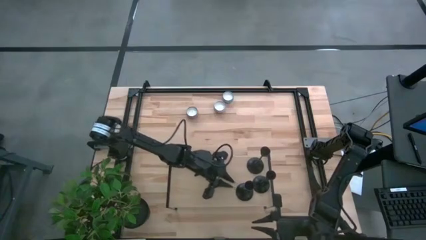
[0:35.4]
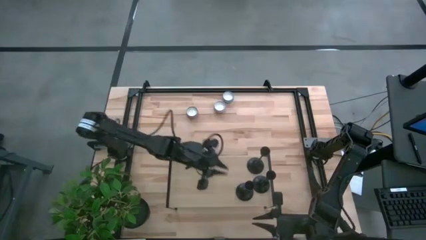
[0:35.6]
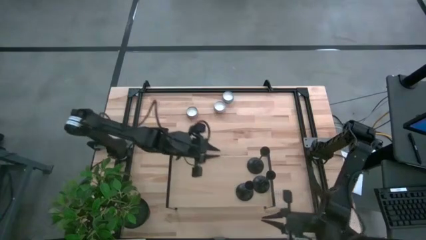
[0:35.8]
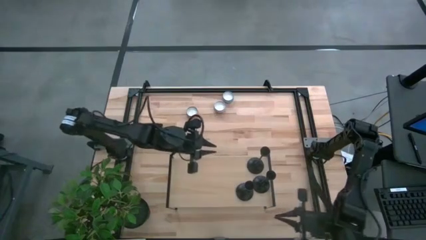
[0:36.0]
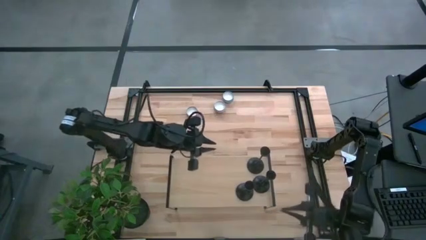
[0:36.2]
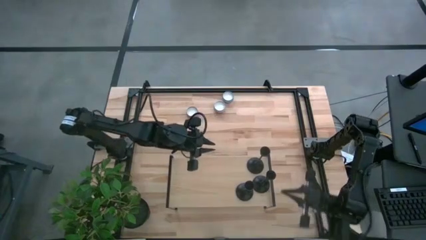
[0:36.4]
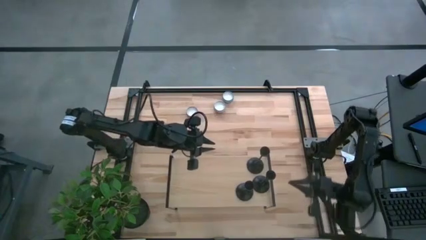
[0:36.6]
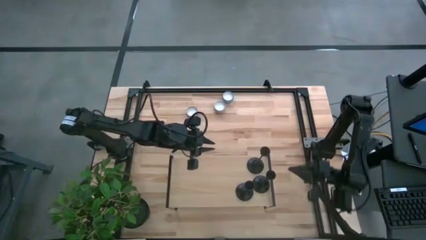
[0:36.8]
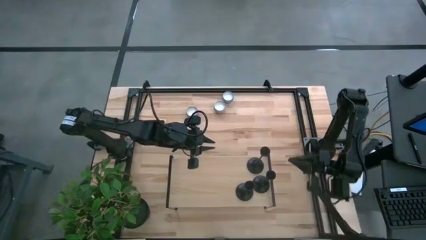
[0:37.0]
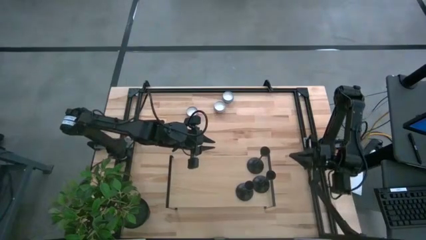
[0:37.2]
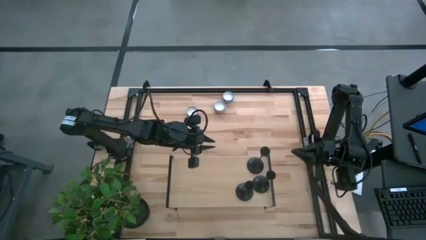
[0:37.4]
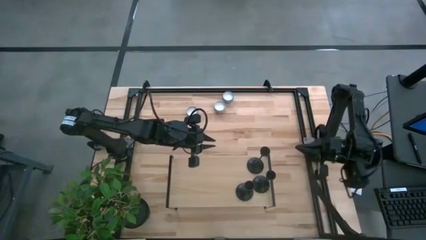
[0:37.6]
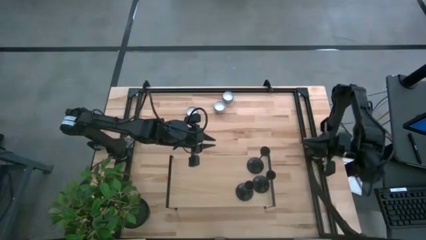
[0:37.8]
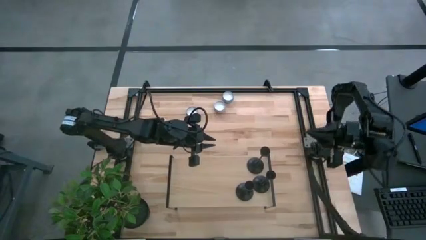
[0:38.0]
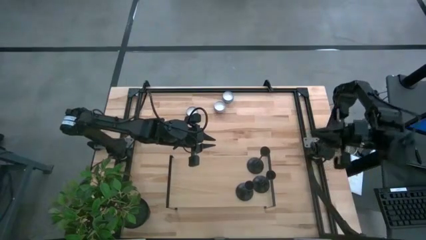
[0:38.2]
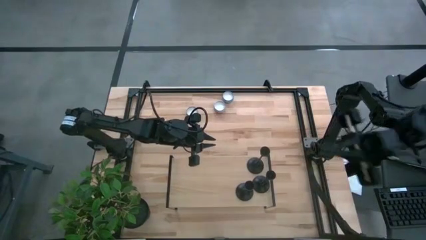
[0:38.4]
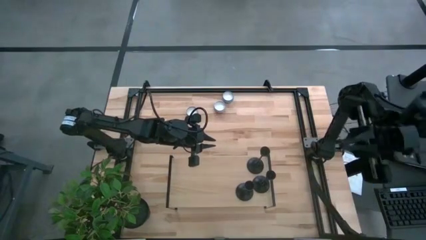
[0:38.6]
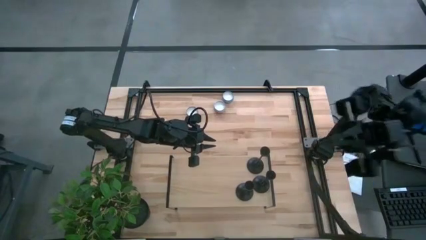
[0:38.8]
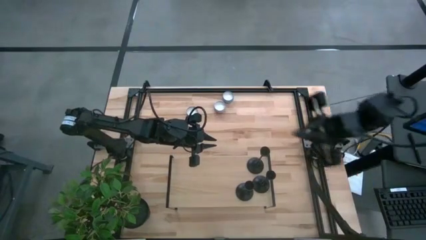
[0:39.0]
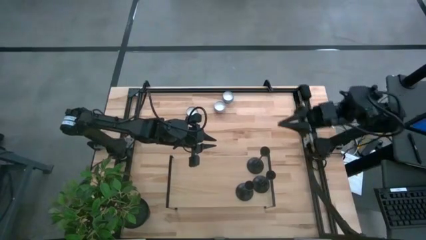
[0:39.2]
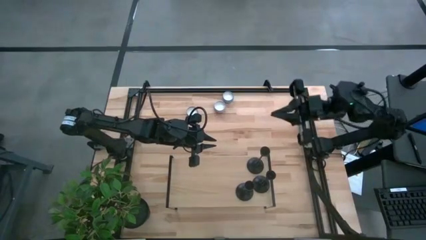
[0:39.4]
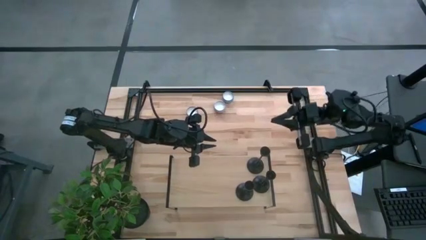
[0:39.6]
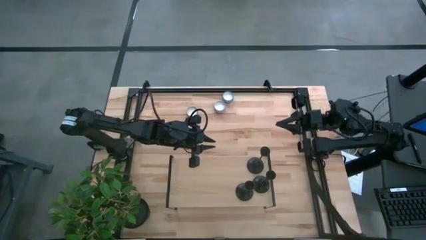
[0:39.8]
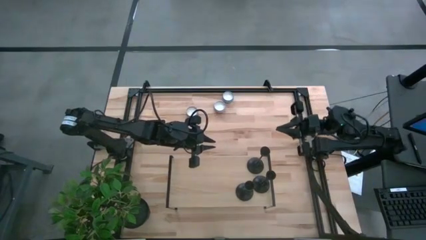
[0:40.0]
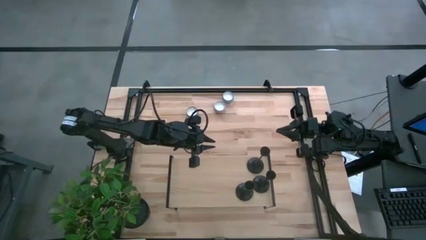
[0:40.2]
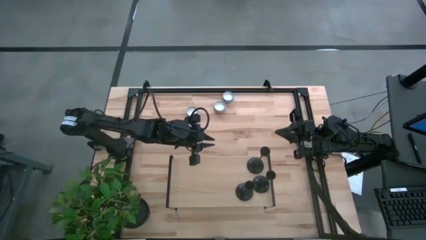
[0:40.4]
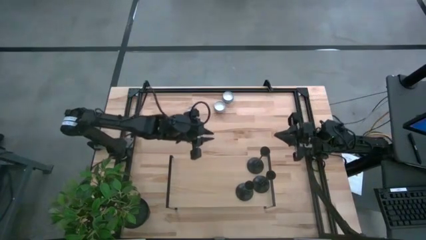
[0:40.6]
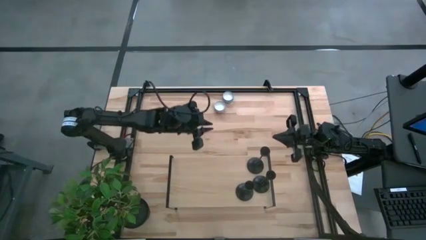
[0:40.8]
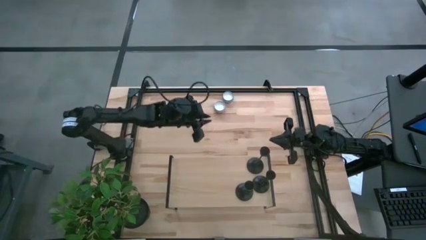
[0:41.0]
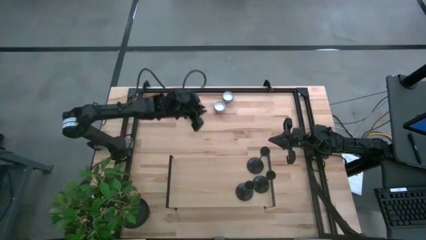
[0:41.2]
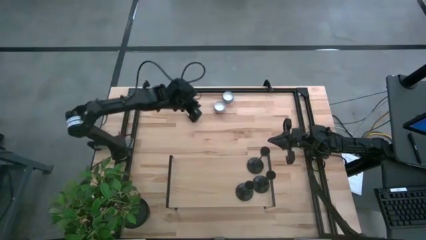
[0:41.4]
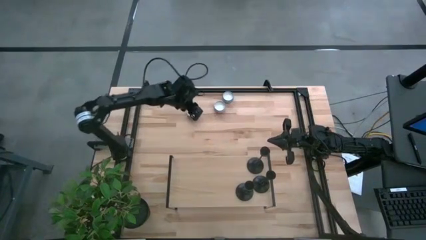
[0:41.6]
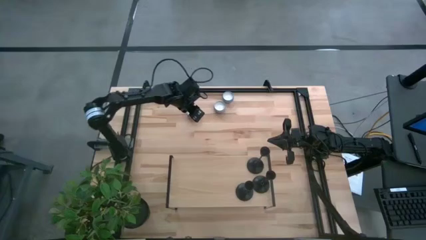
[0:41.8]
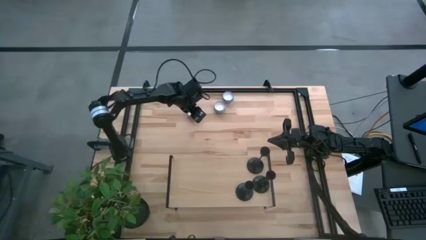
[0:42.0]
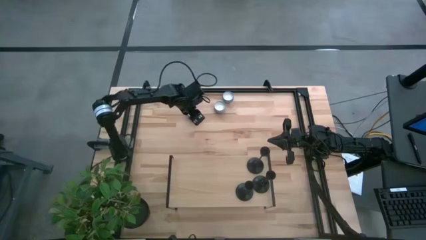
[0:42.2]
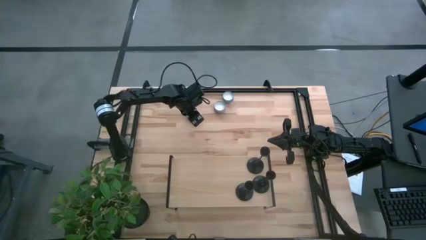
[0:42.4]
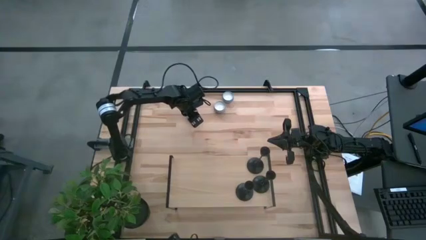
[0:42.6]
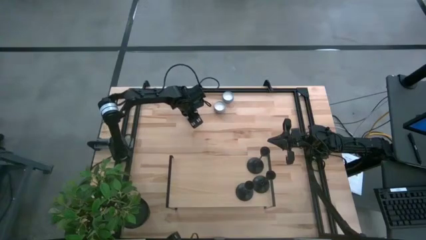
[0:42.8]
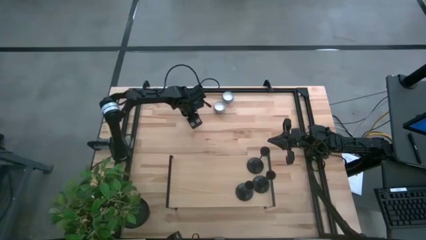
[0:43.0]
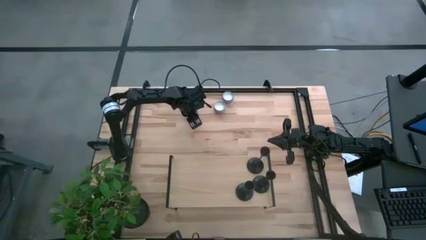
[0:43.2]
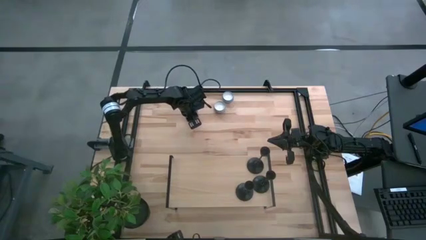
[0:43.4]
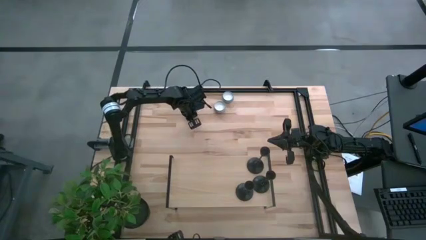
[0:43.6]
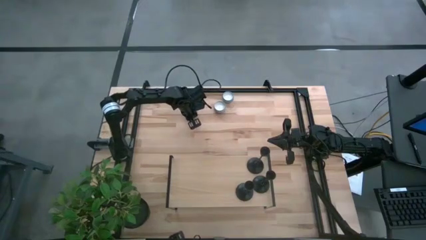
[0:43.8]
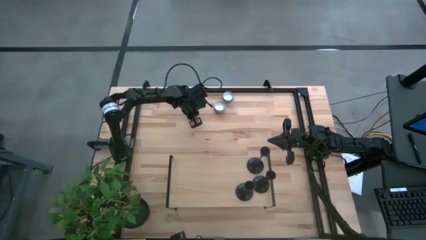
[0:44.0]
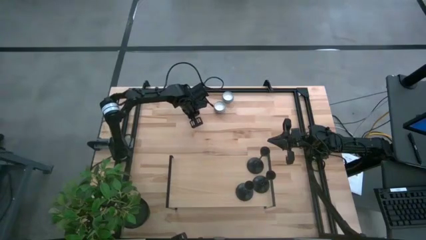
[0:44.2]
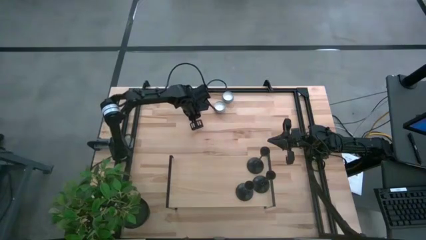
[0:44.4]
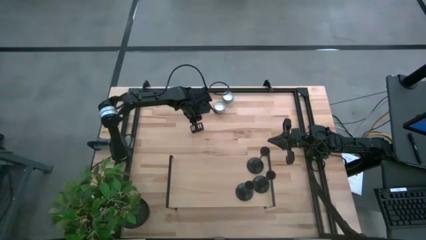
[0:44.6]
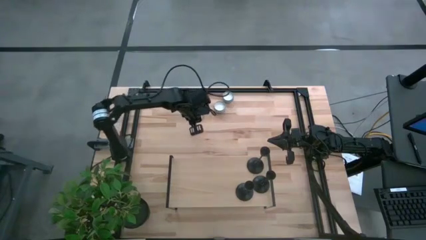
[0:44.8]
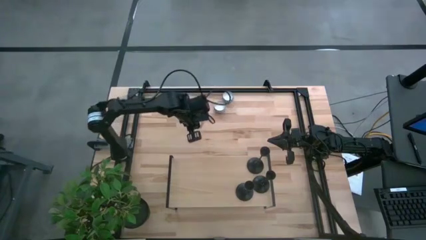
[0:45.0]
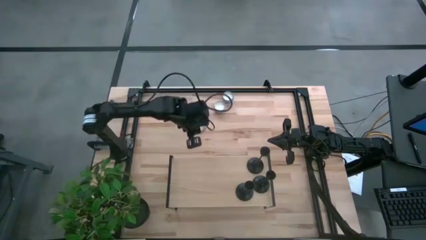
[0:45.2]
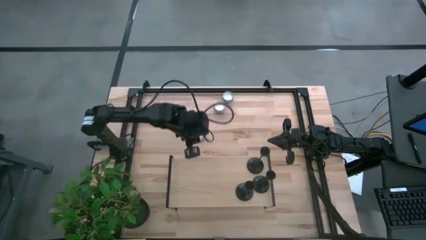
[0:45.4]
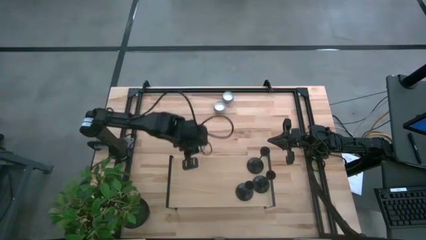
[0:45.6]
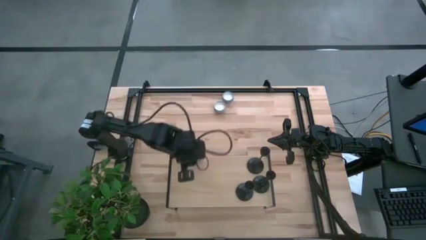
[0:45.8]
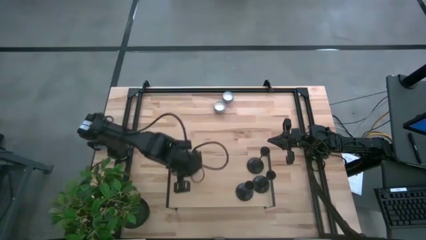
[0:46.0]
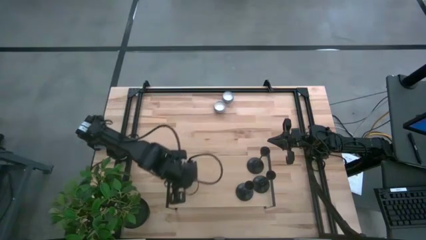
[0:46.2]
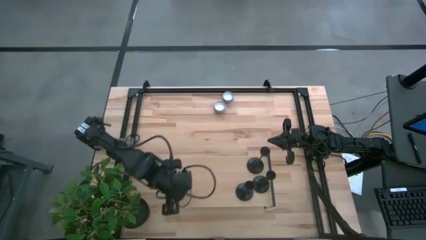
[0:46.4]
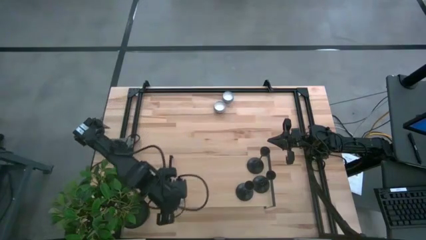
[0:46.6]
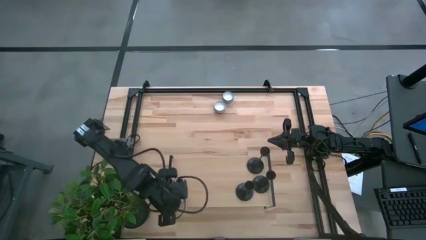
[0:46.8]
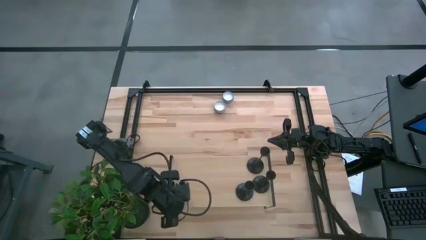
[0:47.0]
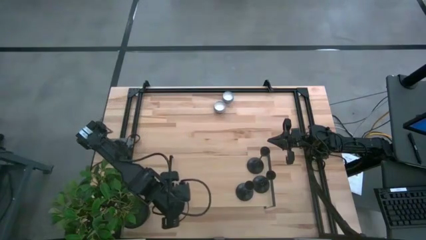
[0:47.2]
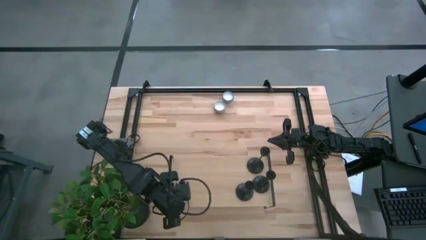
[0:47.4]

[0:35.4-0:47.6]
Task: Pick & Place candle stick holders
Put the pink scented candle on the shelf

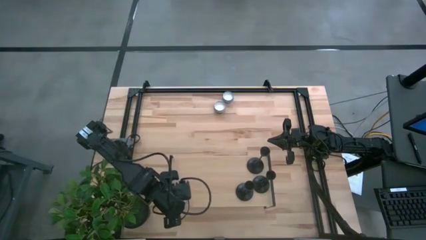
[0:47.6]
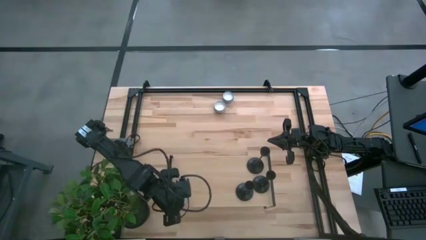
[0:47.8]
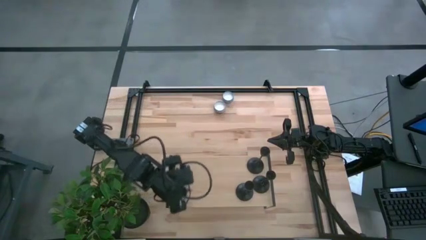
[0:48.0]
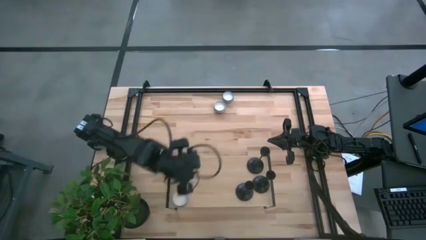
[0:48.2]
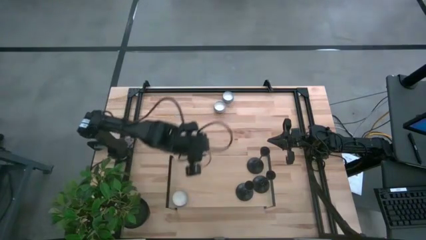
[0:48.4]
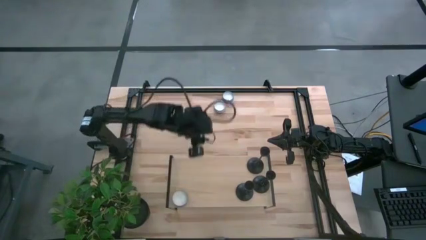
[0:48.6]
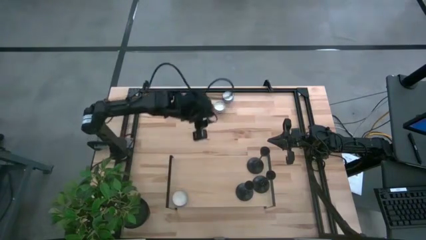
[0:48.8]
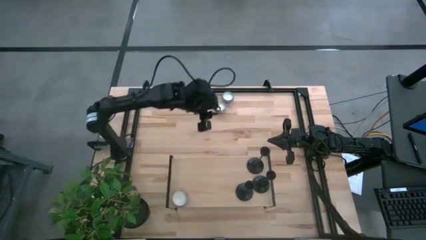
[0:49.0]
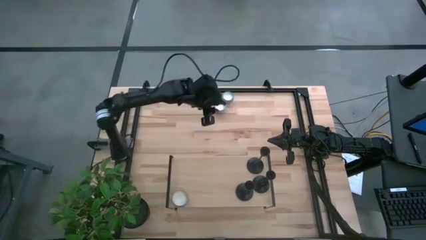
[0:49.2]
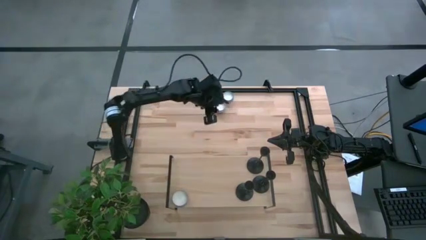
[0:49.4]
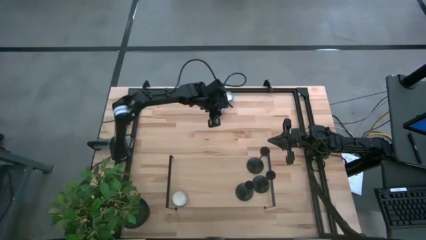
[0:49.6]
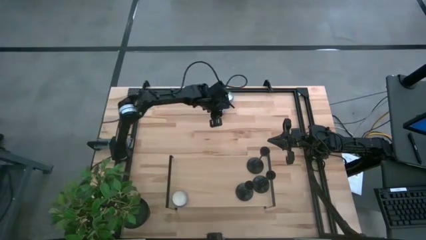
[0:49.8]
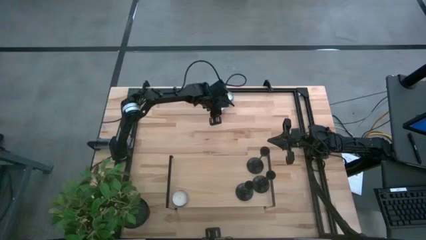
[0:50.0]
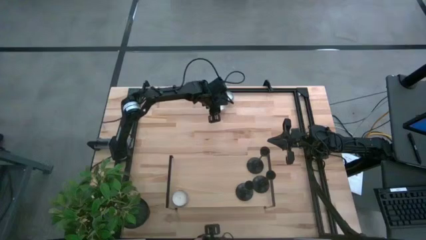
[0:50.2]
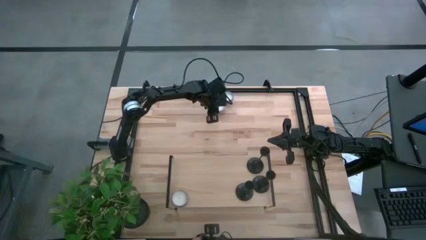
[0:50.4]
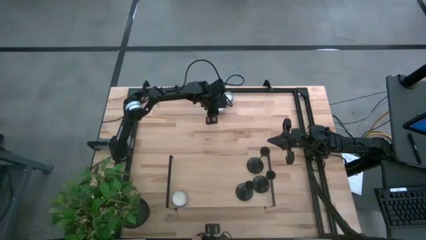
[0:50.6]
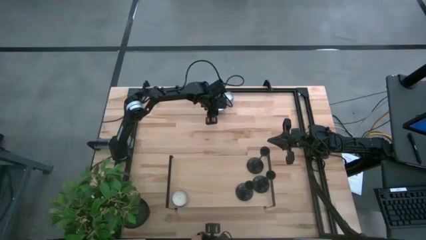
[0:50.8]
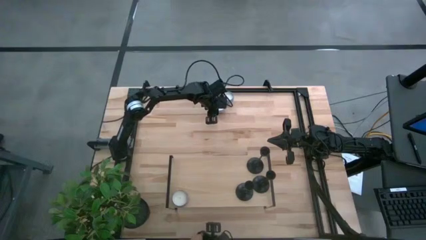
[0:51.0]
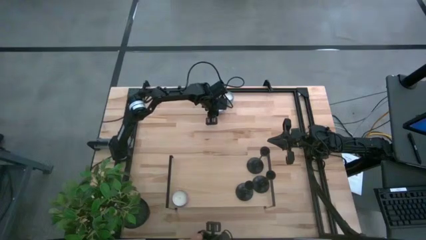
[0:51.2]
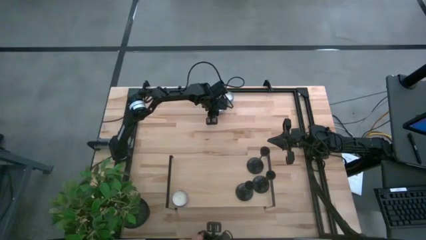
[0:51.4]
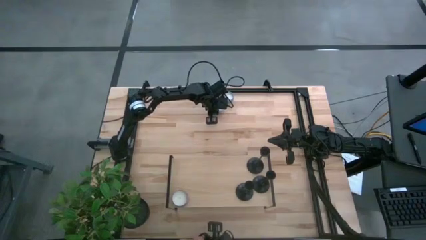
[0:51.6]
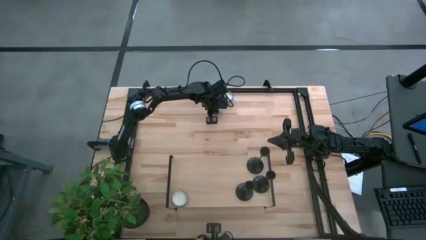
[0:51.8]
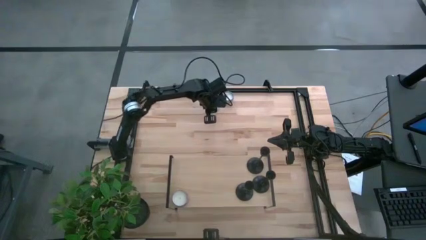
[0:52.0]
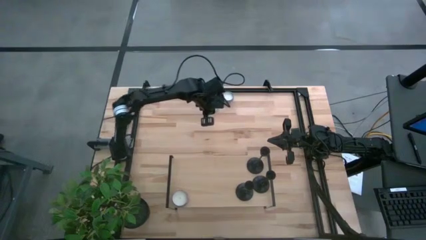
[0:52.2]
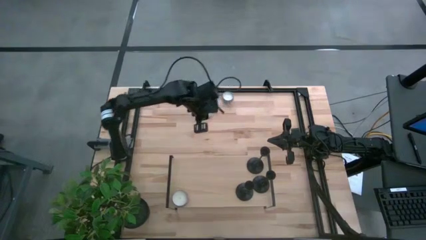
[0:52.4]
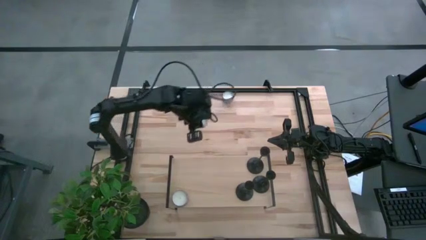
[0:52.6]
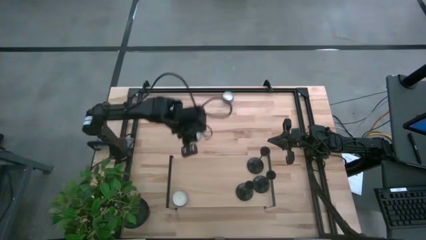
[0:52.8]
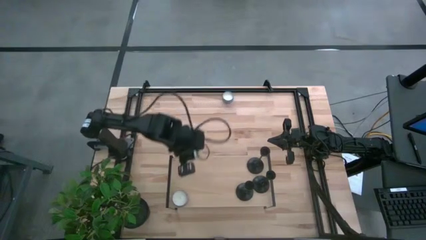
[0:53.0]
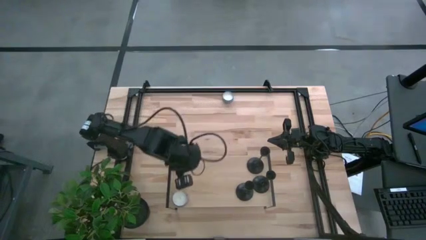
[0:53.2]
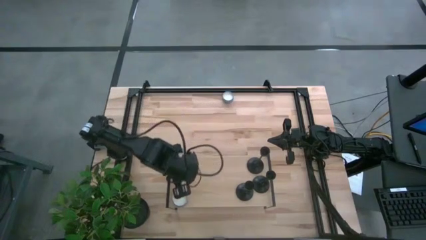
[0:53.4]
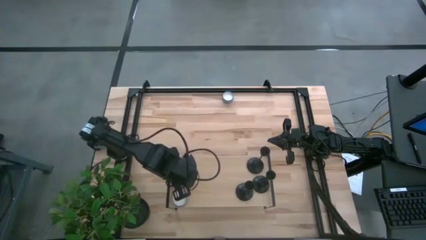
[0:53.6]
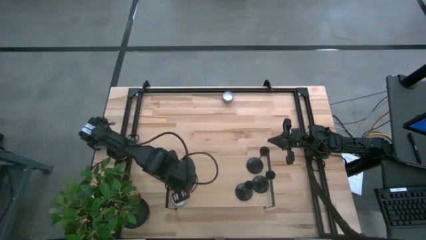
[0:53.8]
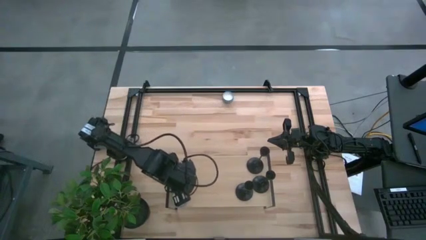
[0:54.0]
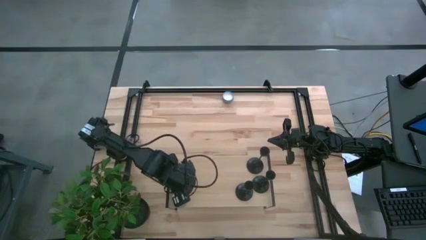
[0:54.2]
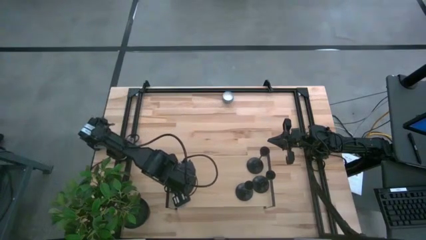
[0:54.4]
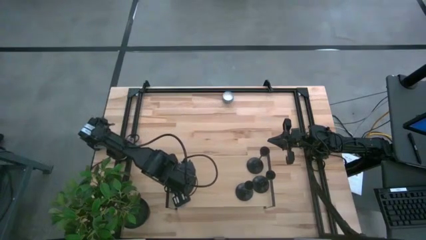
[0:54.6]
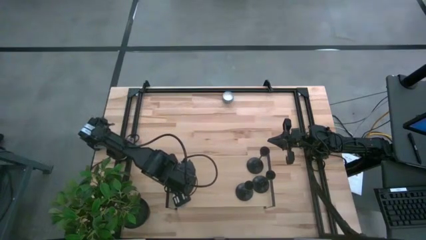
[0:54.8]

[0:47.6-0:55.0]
Put the white scented candle on the shelf aligned with the pink scented candle
